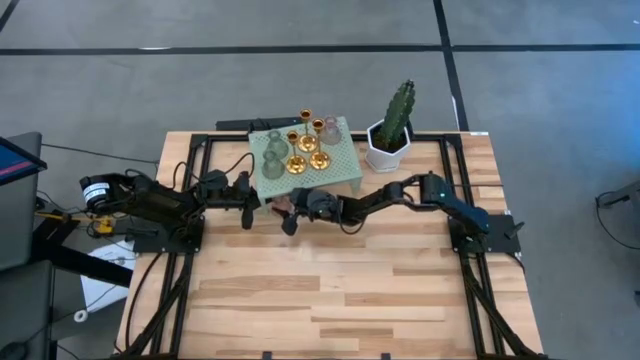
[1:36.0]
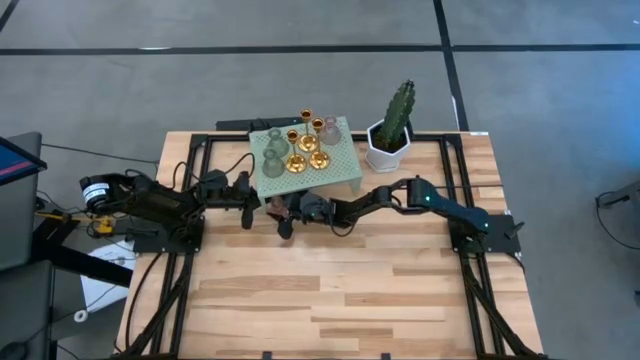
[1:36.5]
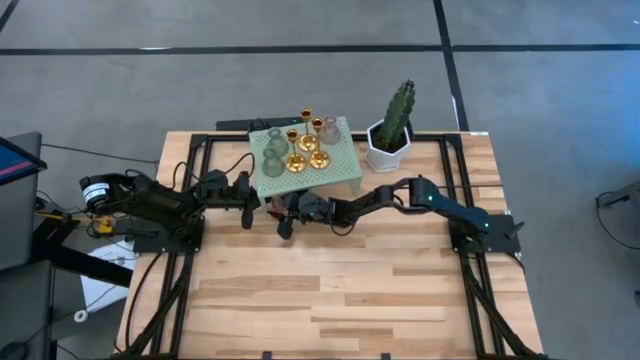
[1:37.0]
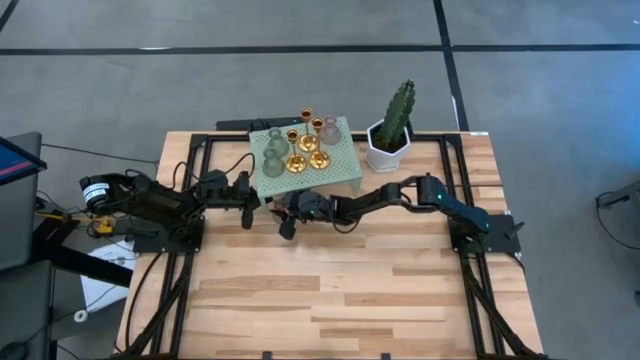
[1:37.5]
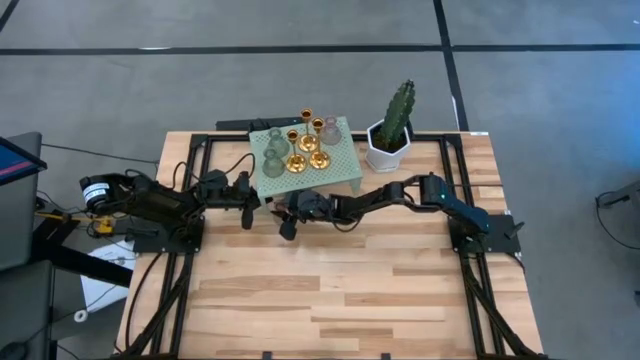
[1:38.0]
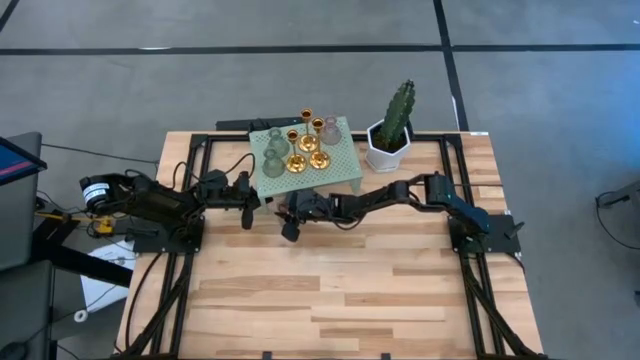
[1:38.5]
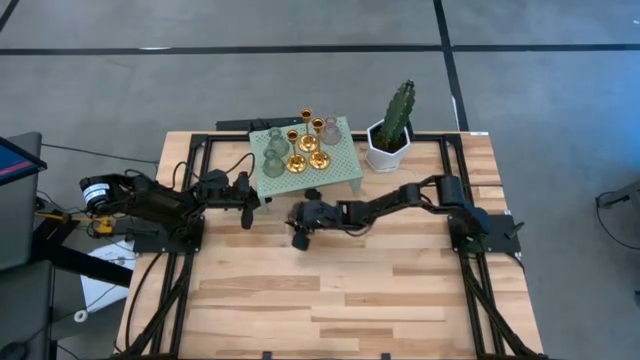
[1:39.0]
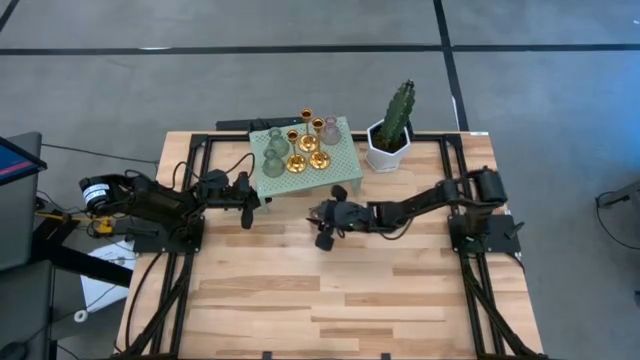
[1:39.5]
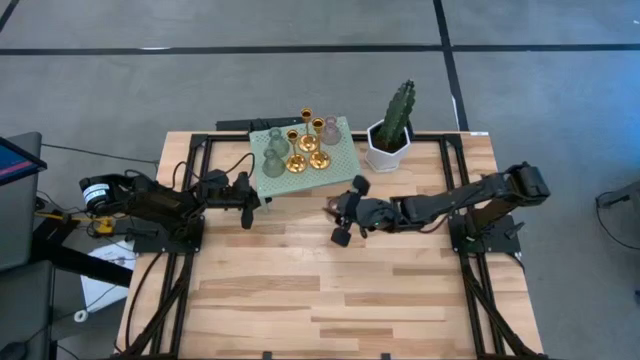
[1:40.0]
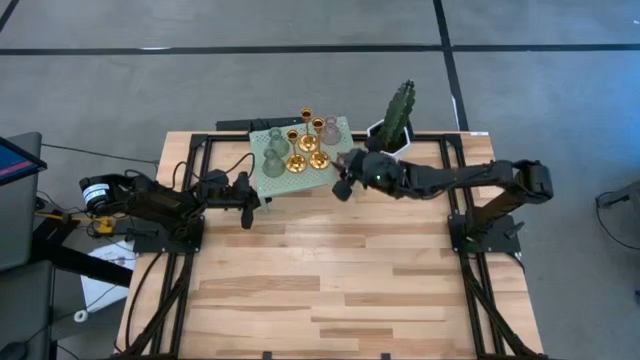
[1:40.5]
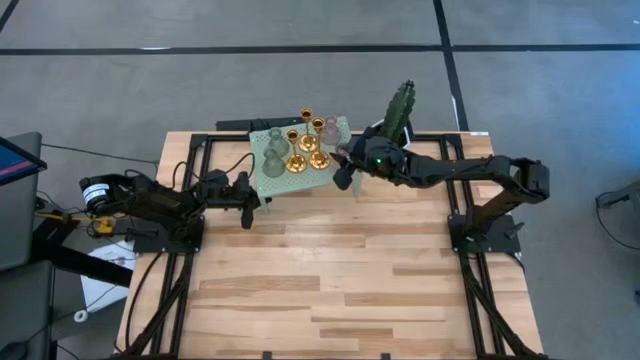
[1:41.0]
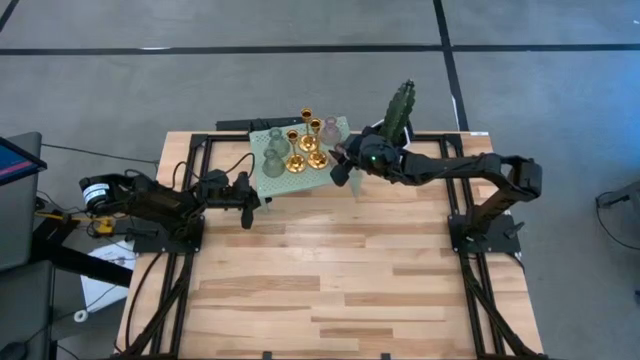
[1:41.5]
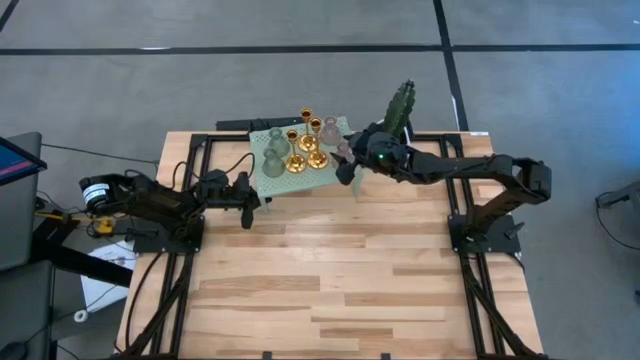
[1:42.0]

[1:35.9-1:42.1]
Task: Pick & Place candle stick holders
Put the pink glass candle holder on the shelf

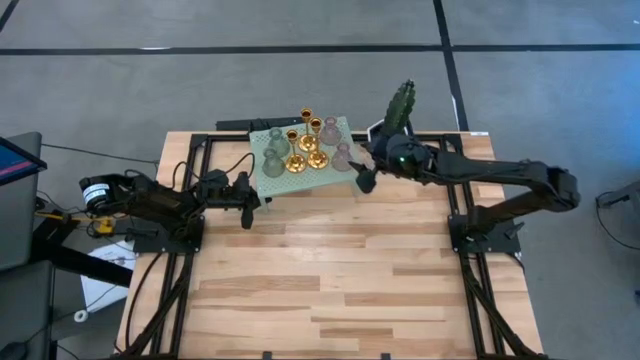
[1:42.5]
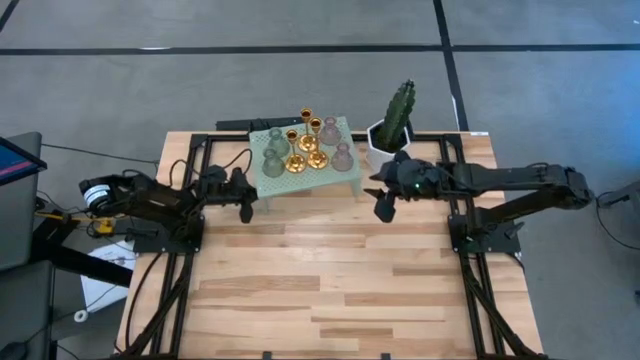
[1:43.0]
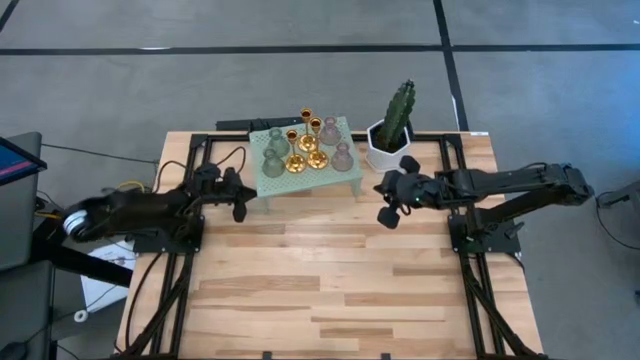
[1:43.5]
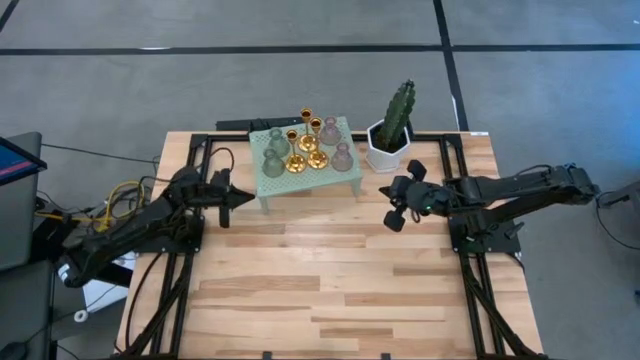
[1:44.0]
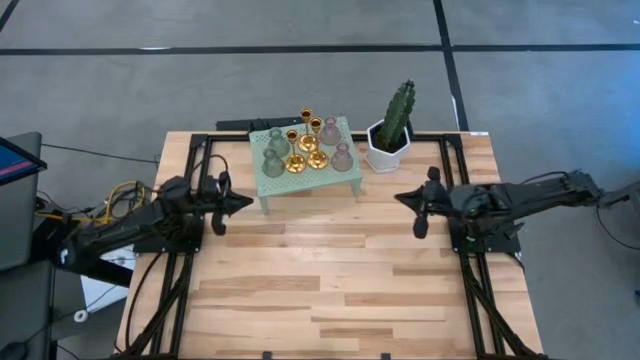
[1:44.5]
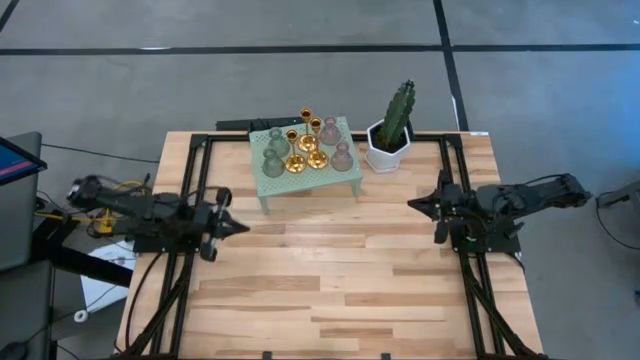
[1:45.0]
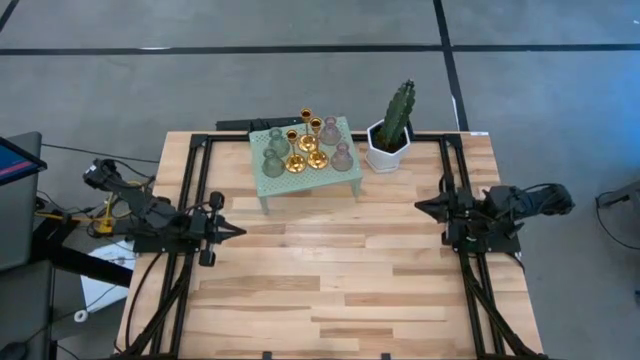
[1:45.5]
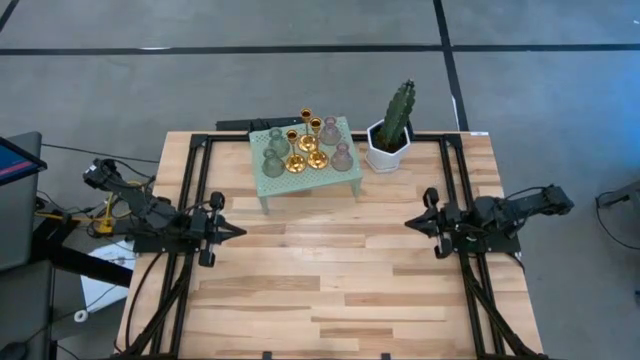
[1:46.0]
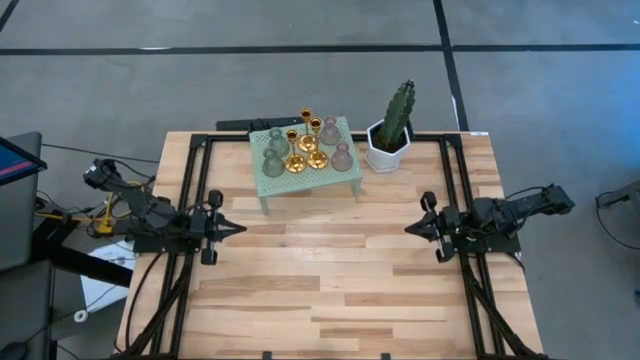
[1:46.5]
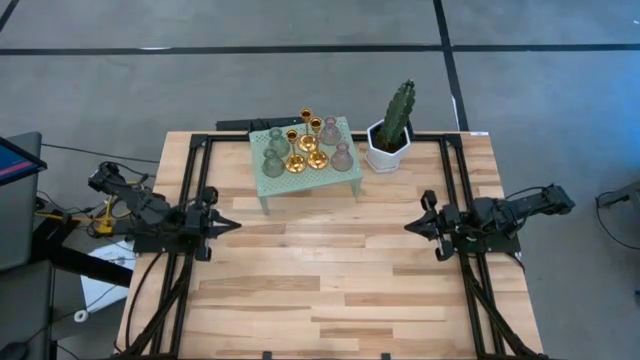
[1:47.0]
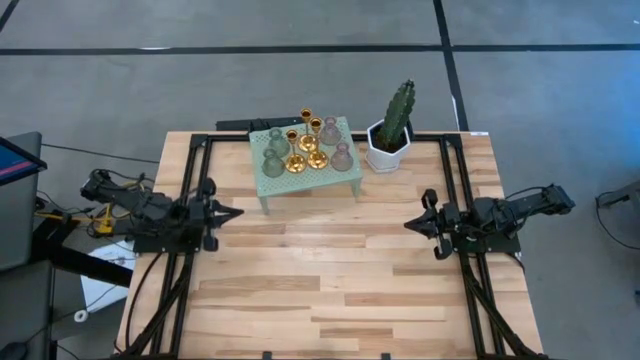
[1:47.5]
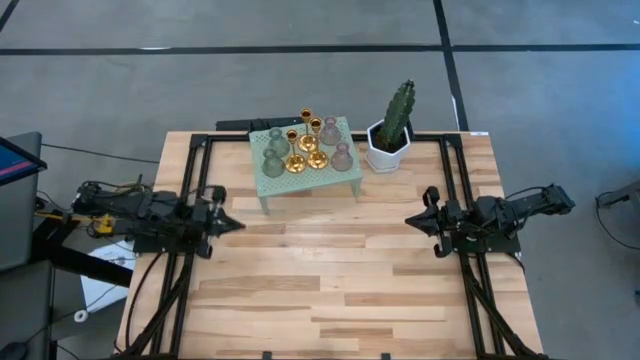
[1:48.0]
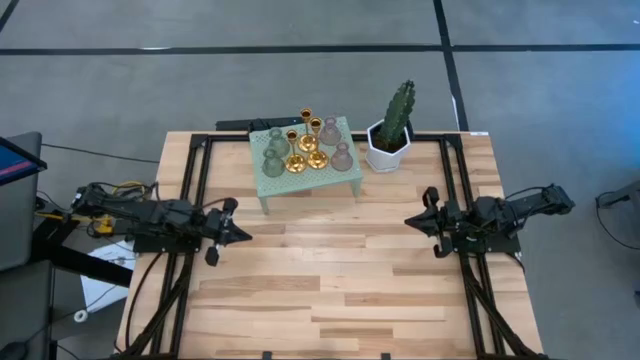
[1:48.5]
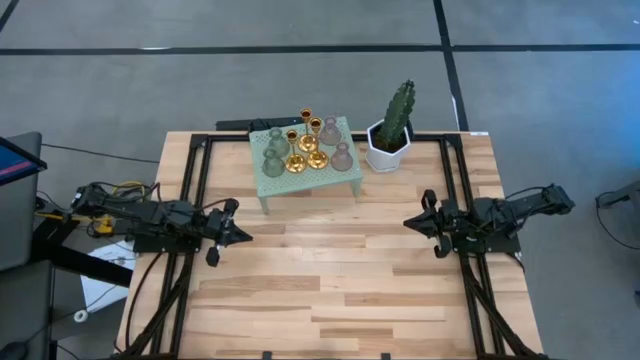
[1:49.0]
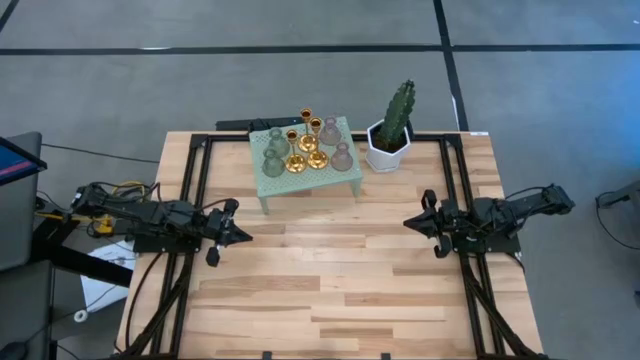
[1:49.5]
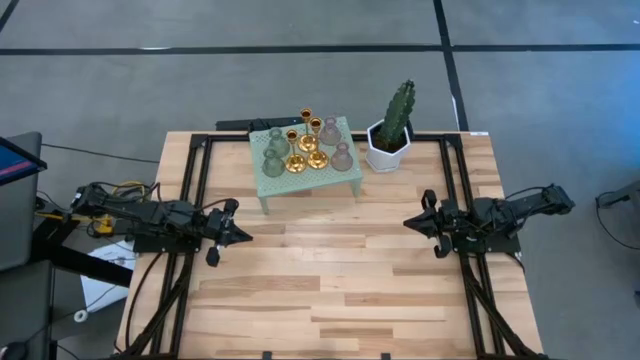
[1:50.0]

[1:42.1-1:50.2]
Return to Home Position

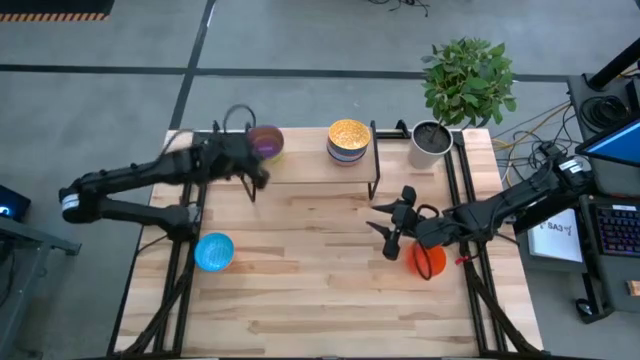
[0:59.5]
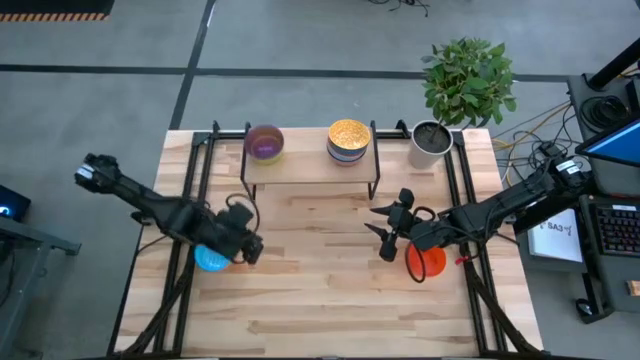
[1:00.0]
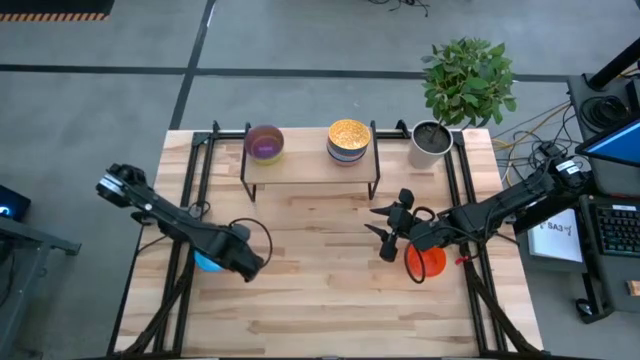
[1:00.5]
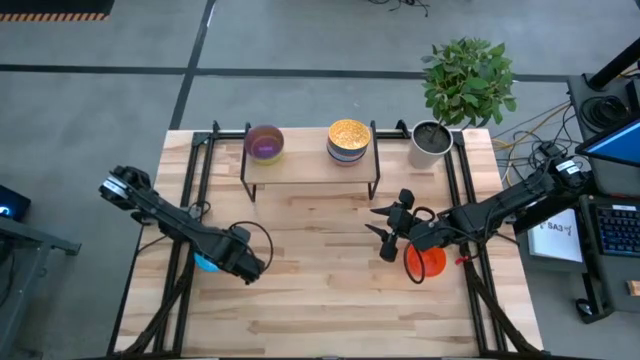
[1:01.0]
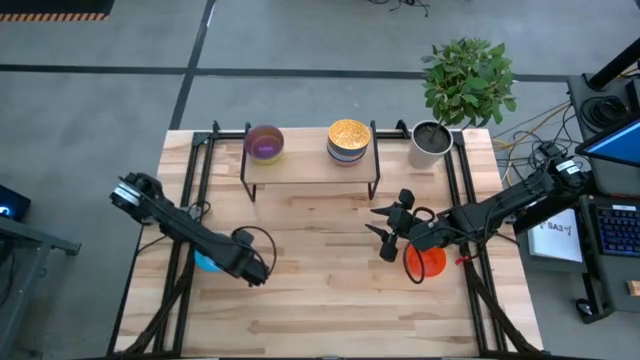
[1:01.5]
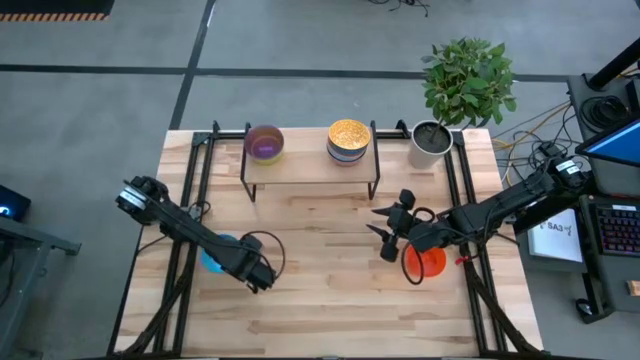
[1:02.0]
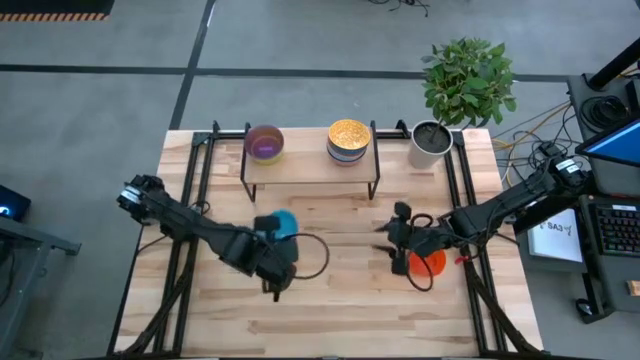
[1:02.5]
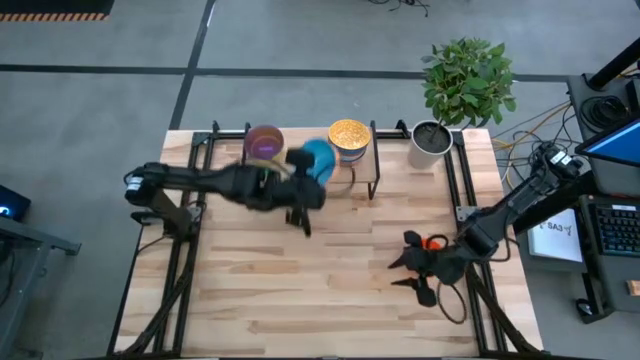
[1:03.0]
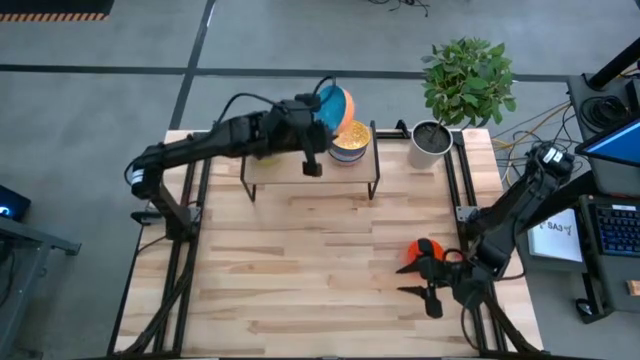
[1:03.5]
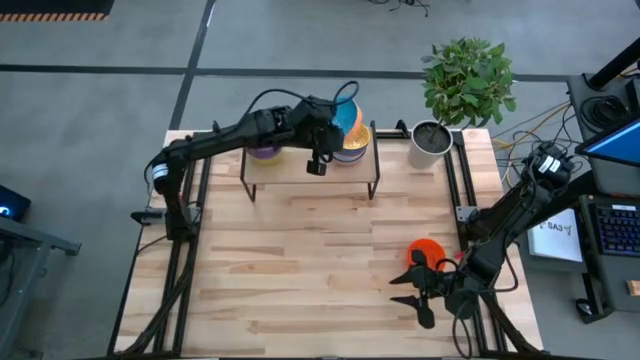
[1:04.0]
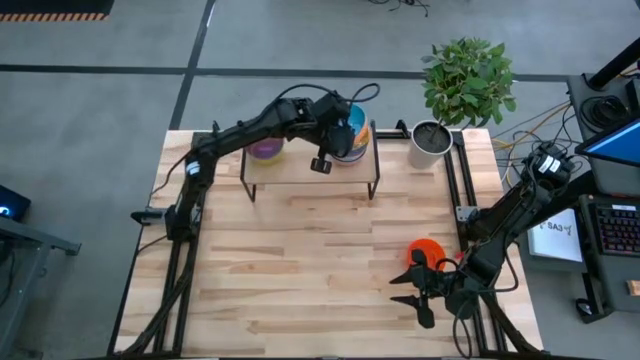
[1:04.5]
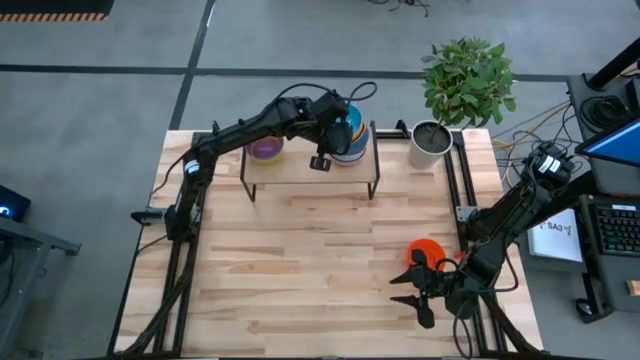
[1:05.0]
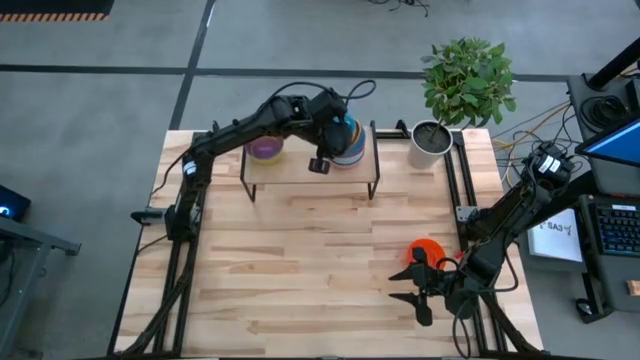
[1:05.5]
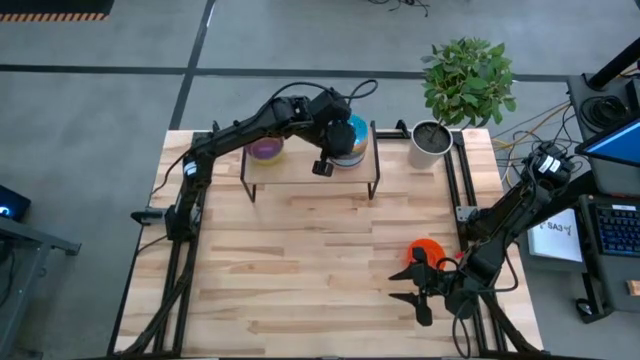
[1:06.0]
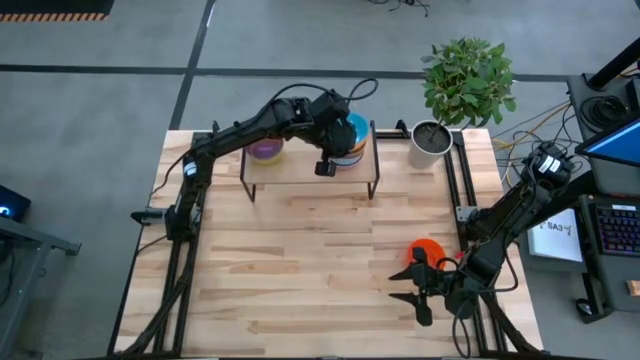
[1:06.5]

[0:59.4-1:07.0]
Task: Place and stack bowls onto a shelf
Stack the yellow bowl on the top of the blue bowl on the shelf
